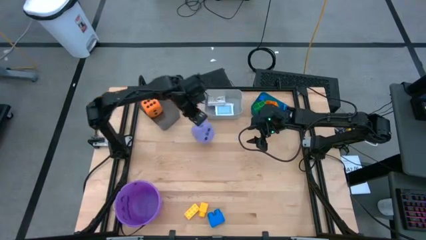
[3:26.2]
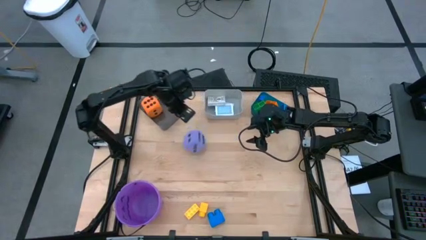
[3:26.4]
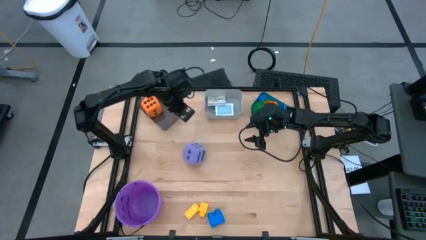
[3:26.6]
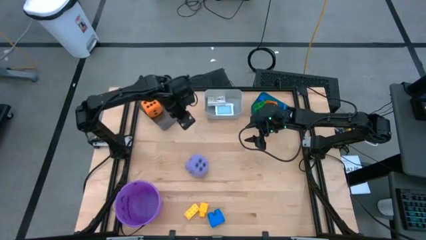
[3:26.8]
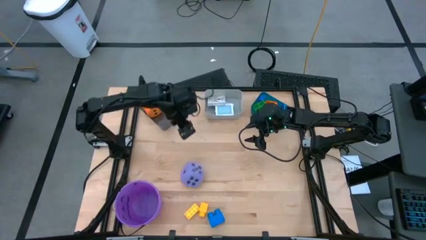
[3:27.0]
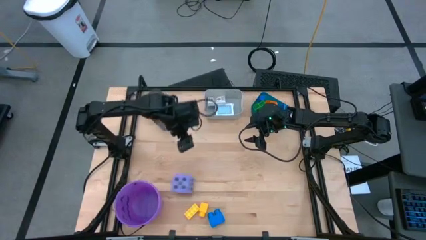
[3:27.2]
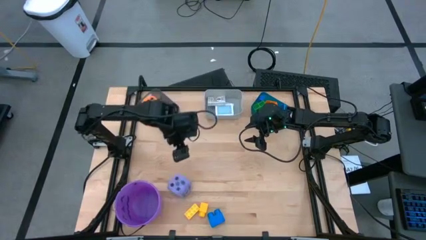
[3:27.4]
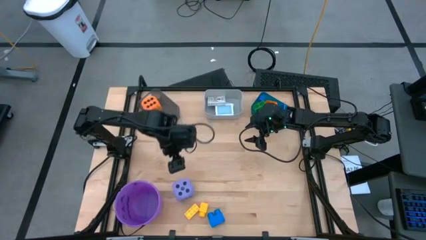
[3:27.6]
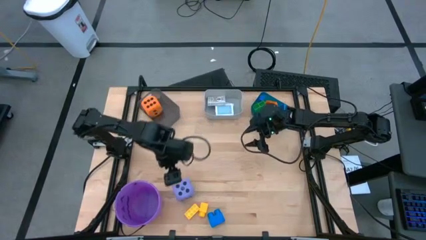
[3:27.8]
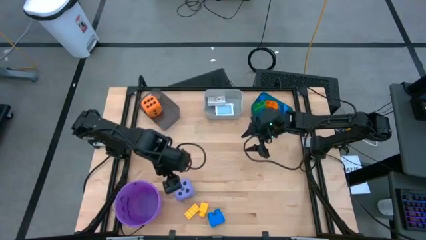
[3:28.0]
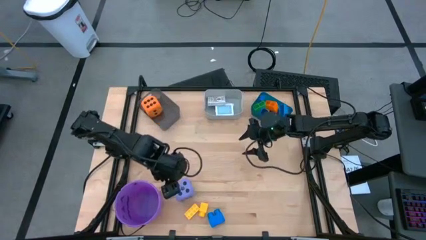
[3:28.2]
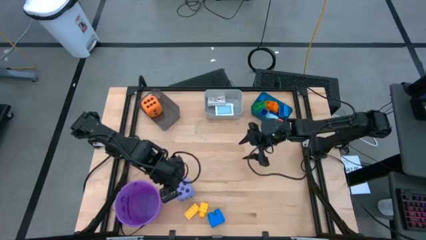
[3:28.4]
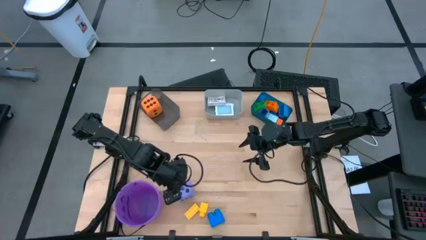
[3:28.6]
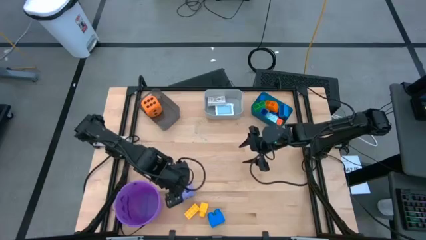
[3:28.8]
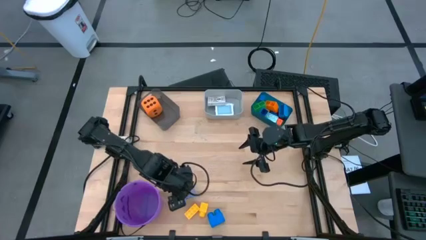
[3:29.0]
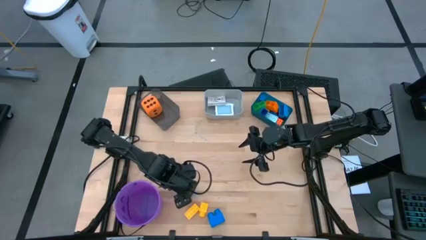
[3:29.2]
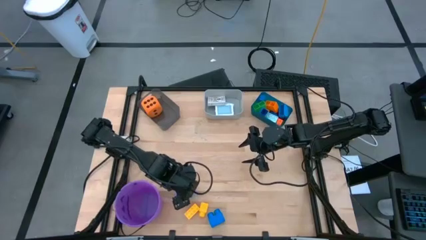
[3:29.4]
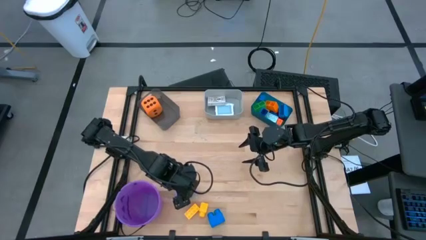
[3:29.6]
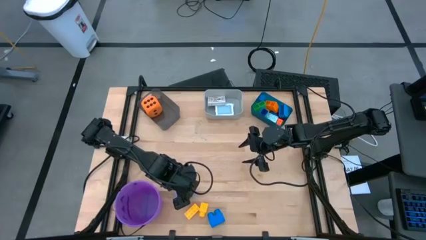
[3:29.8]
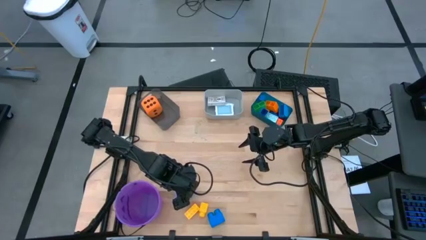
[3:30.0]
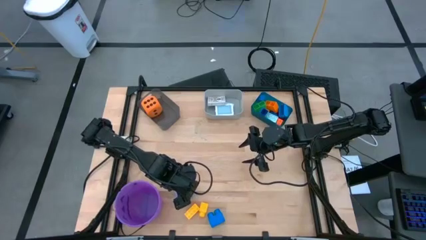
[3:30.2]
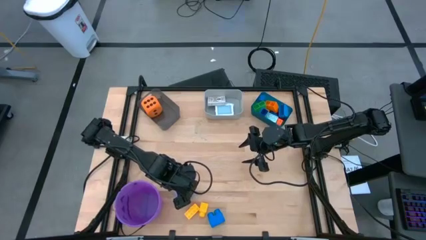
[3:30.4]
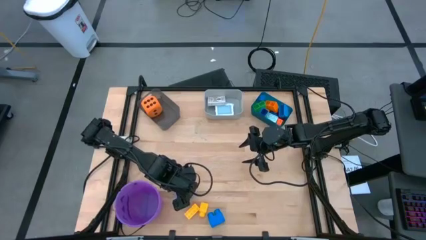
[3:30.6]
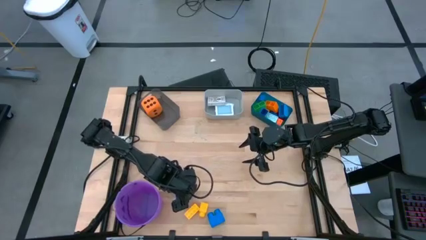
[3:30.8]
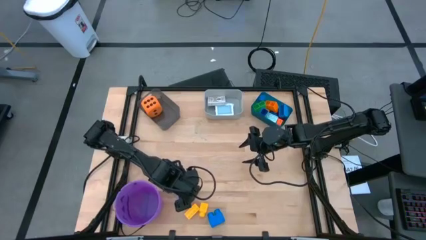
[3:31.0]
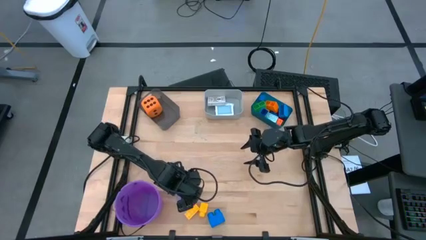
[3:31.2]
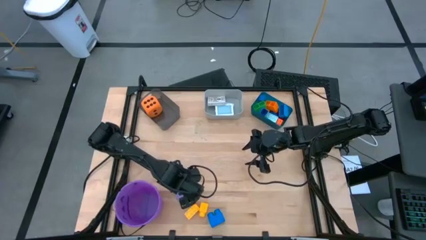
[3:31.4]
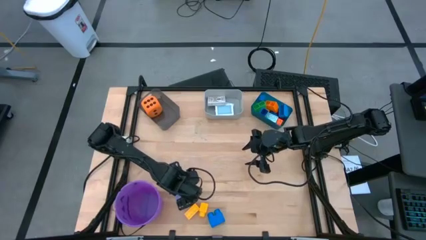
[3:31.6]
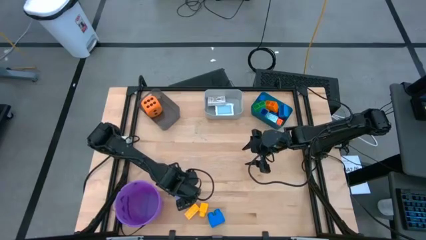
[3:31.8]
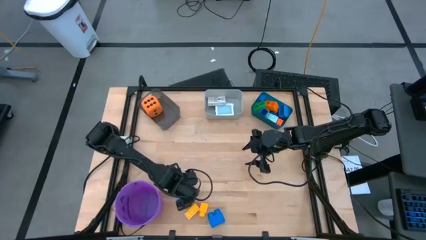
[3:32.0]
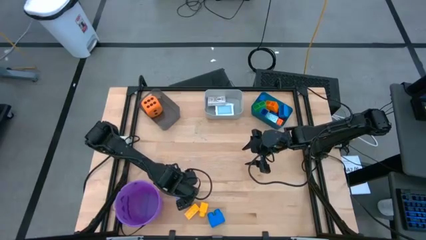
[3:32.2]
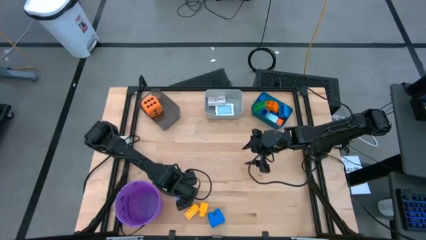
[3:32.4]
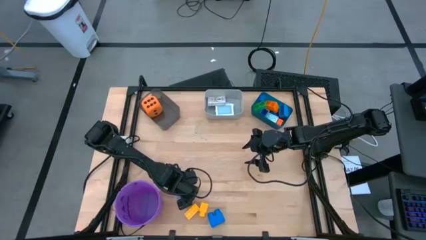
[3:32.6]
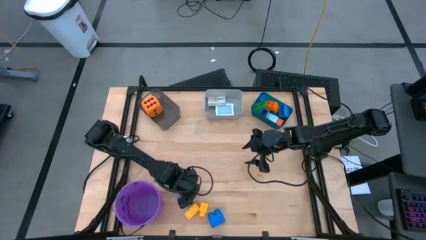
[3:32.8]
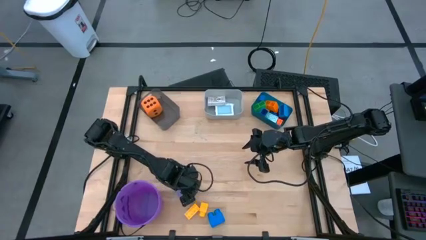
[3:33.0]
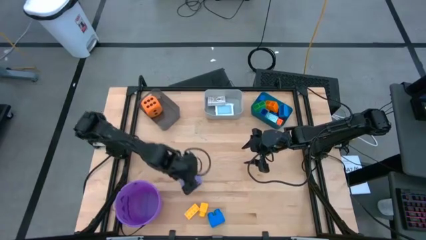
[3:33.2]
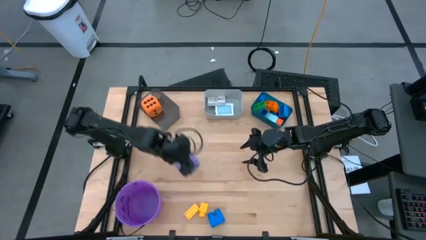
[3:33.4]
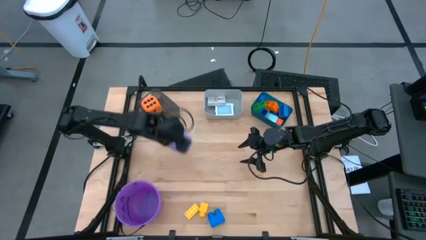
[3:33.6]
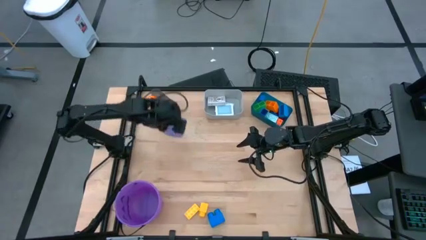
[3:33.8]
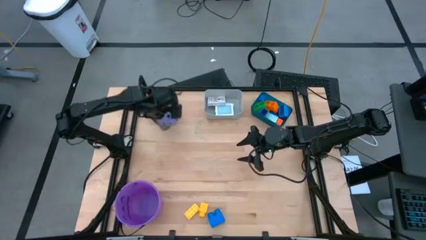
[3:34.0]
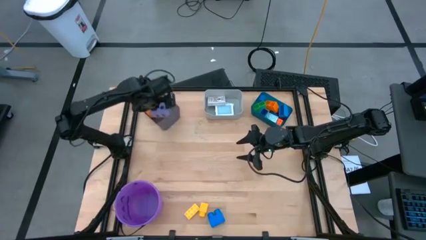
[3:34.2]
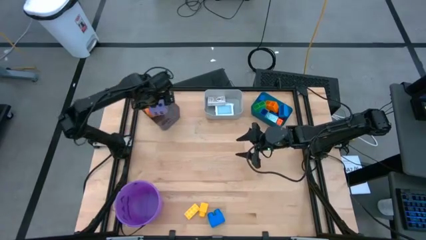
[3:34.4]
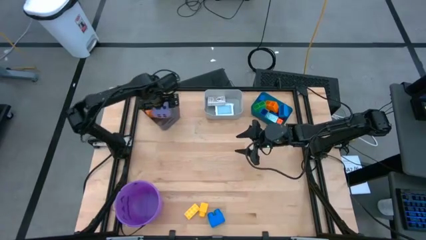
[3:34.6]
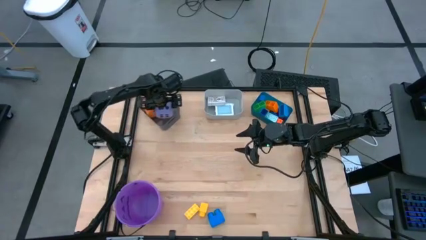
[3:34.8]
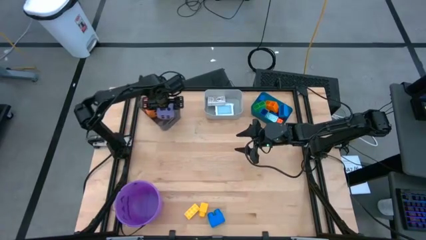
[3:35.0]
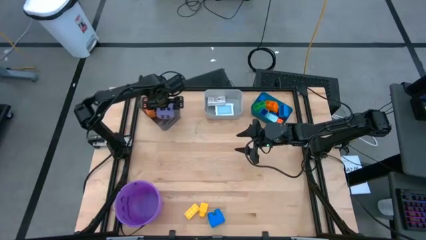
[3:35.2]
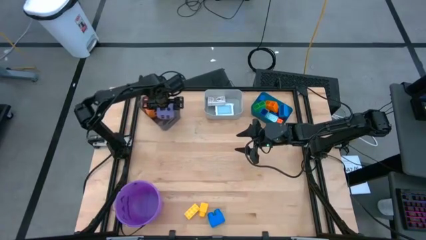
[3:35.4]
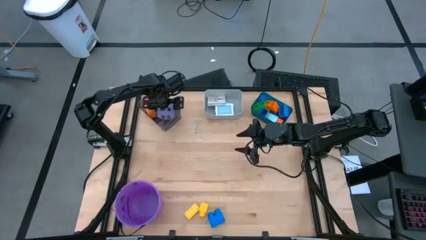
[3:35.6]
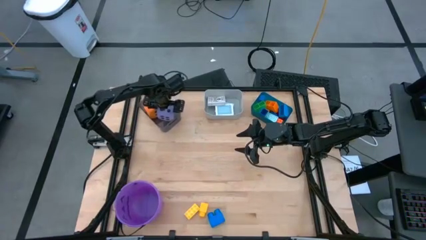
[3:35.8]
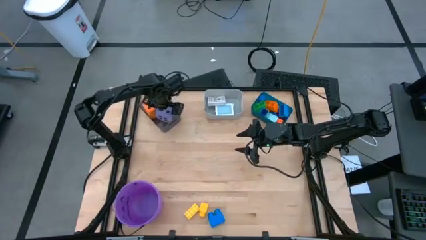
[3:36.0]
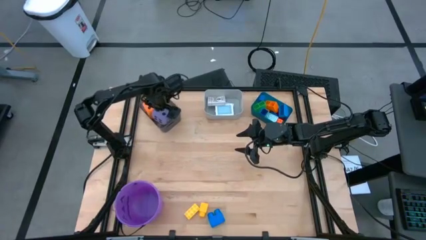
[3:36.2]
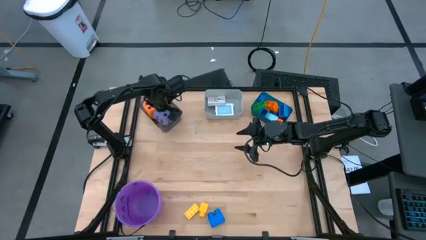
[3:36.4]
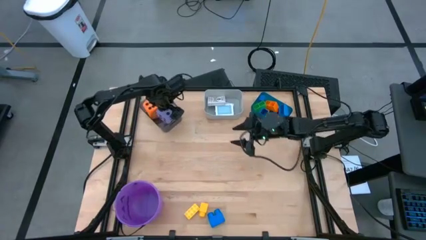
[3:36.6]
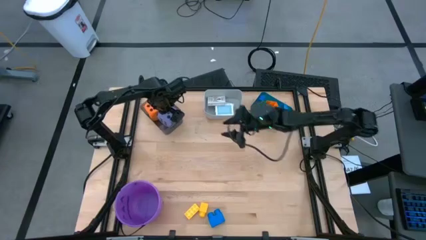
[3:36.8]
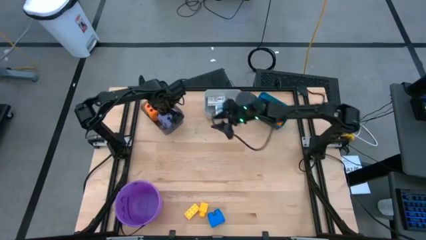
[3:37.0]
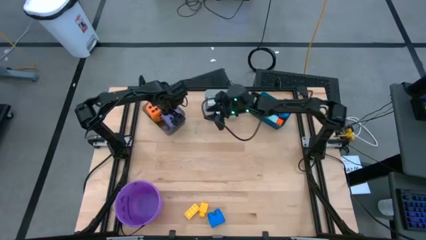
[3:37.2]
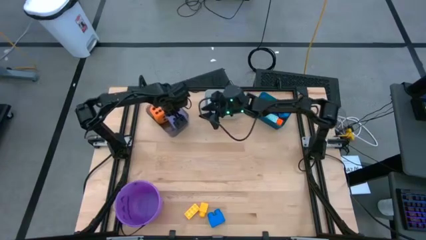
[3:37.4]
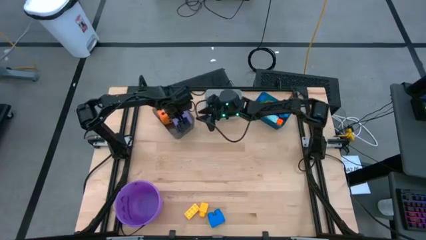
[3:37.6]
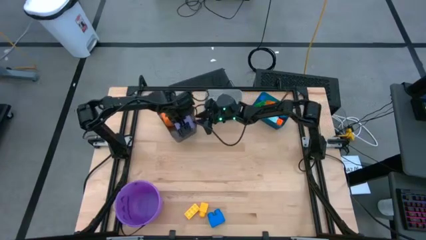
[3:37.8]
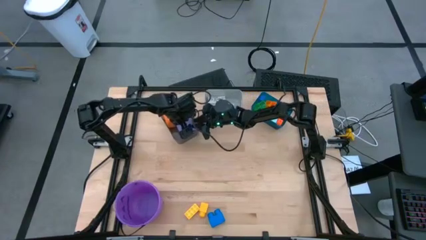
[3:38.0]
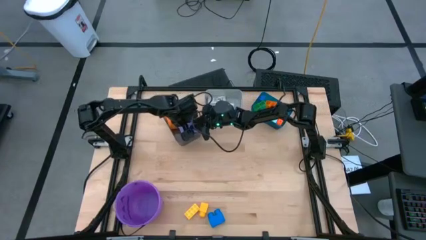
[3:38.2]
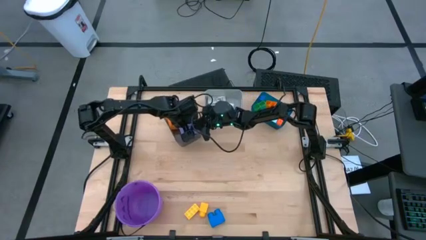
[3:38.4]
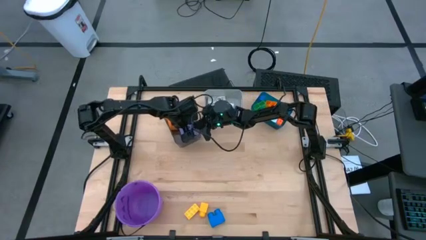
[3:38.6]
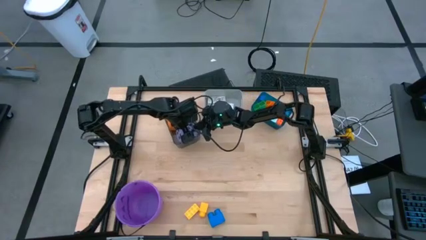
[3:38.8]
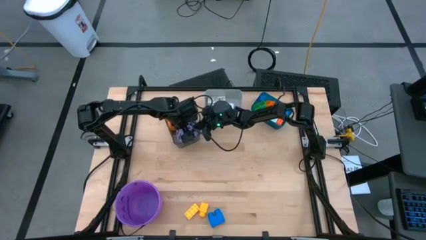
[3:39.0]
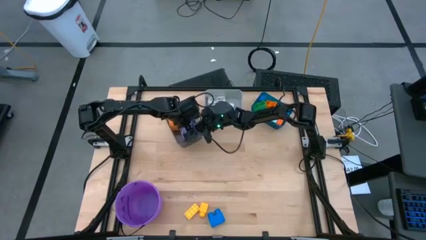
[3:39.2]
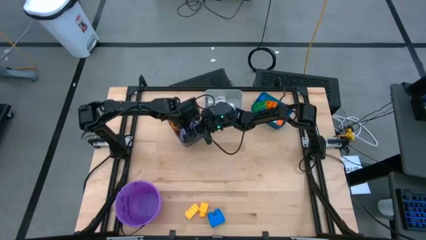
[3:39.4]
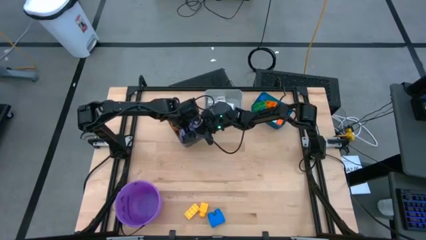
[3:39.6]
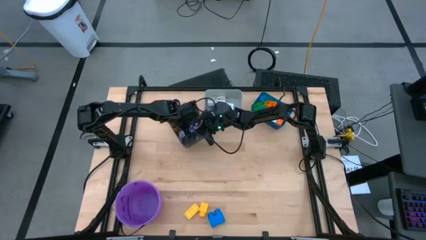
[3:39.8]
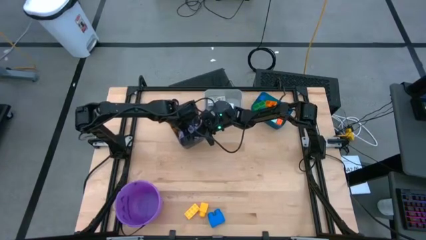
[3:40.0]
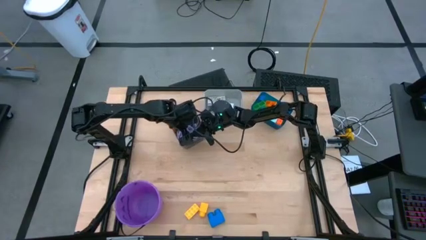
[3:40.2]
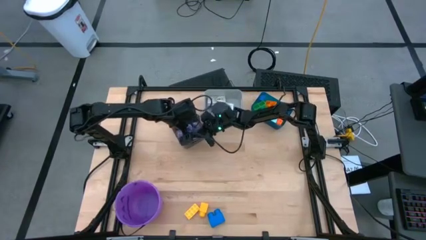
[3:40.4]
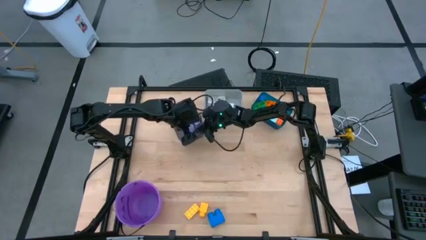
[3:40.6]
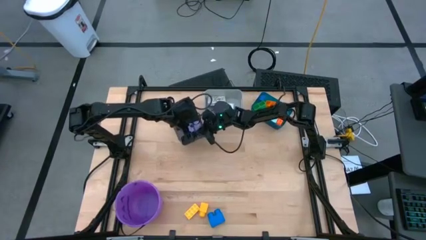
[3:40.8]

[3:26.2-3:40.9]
Task: Pick & Place Toys
Put the purple dice into the black bin
